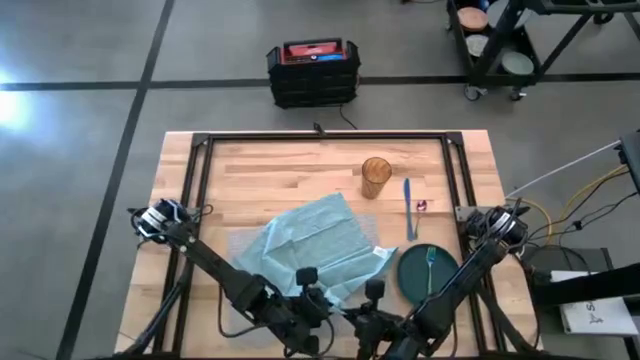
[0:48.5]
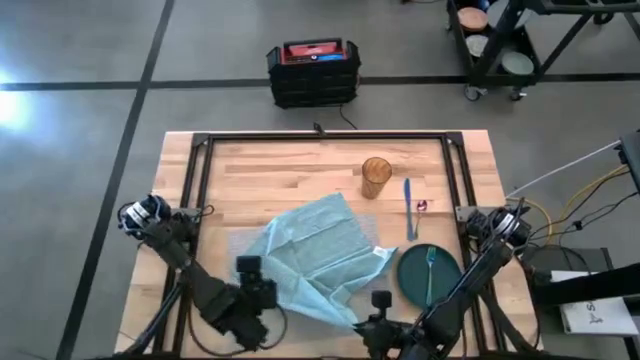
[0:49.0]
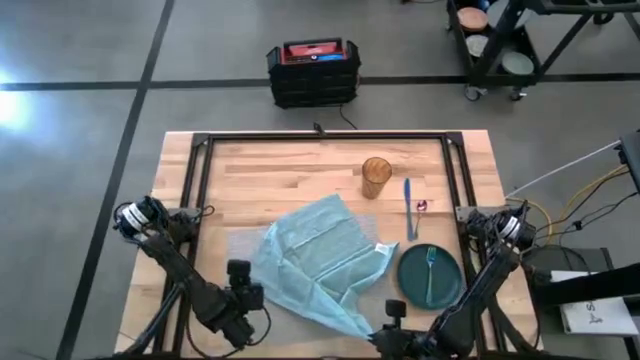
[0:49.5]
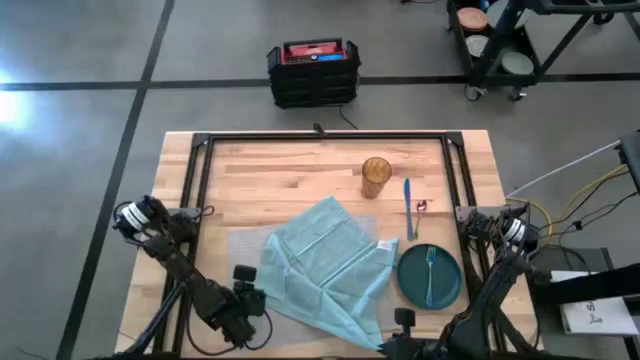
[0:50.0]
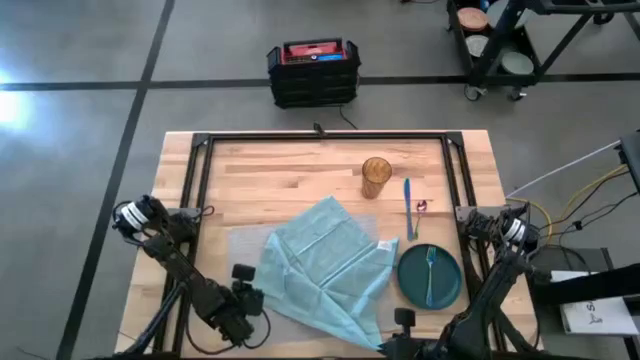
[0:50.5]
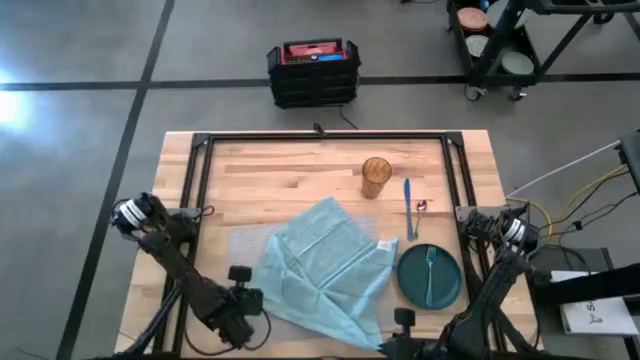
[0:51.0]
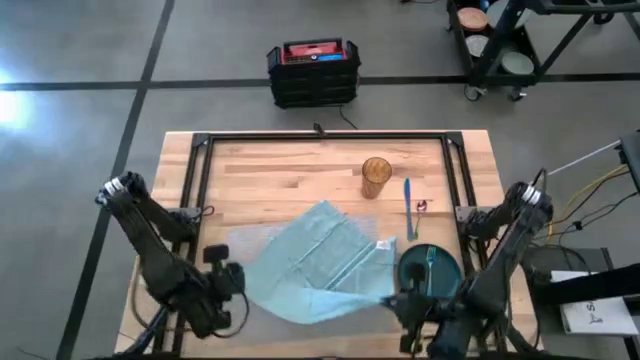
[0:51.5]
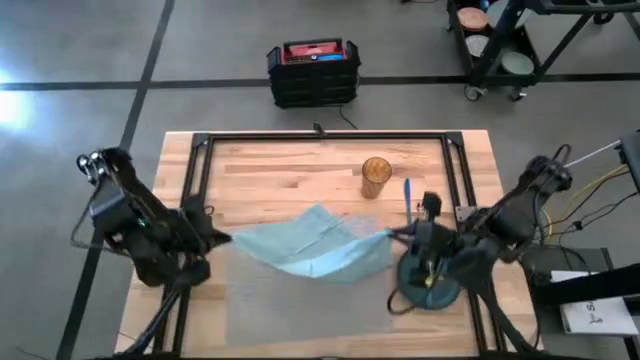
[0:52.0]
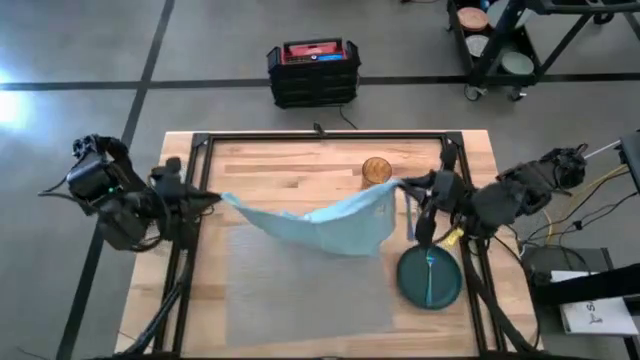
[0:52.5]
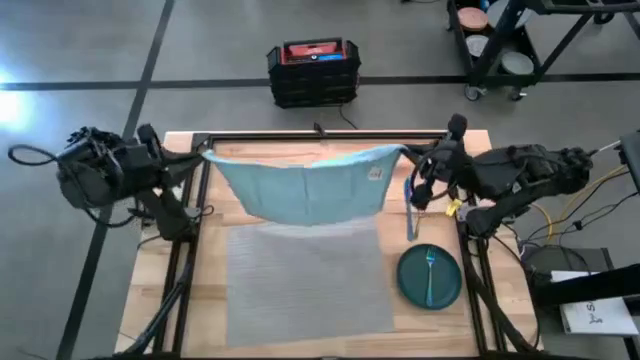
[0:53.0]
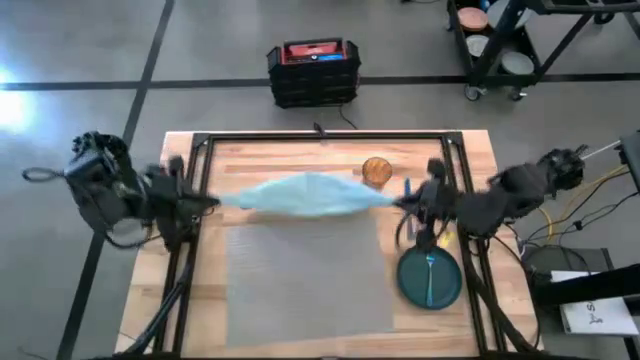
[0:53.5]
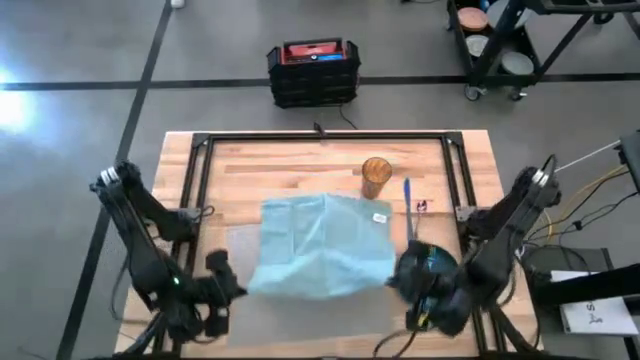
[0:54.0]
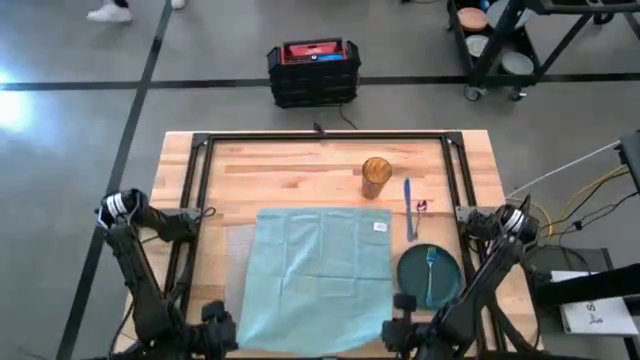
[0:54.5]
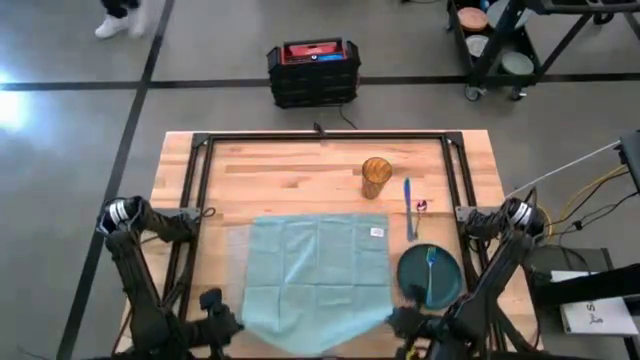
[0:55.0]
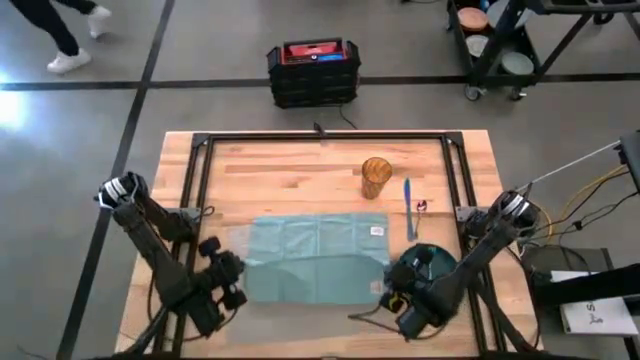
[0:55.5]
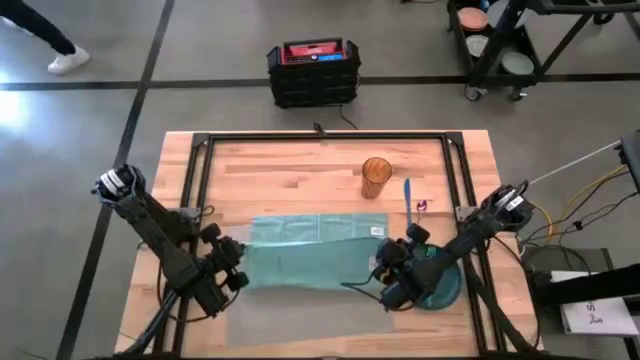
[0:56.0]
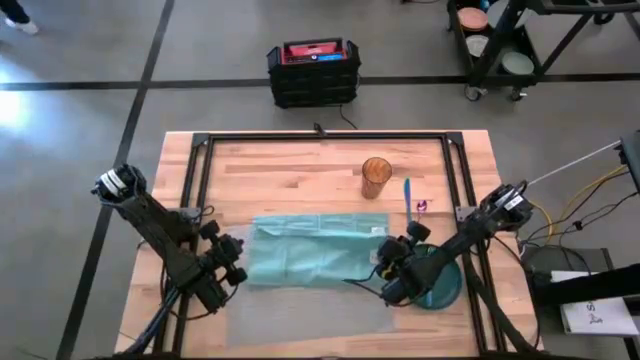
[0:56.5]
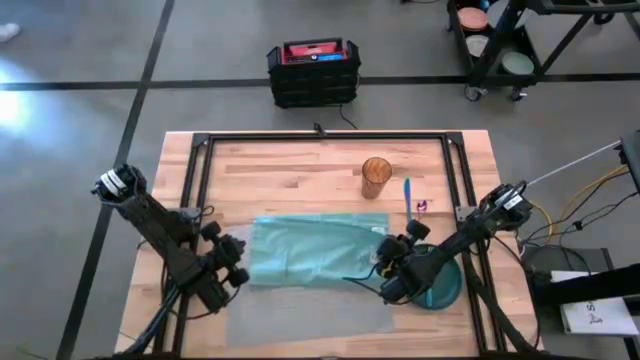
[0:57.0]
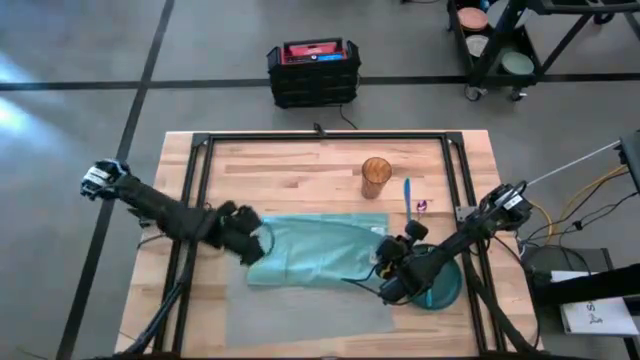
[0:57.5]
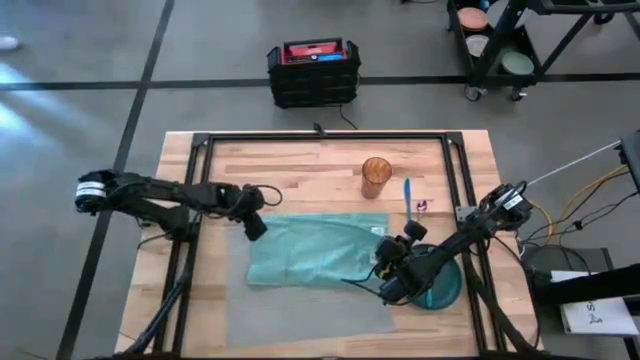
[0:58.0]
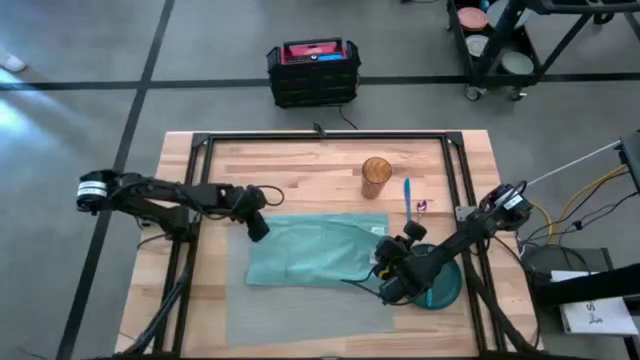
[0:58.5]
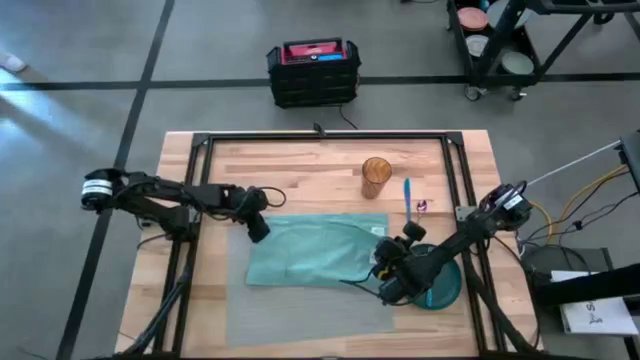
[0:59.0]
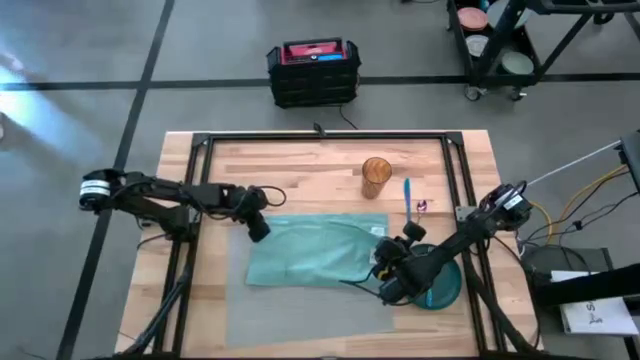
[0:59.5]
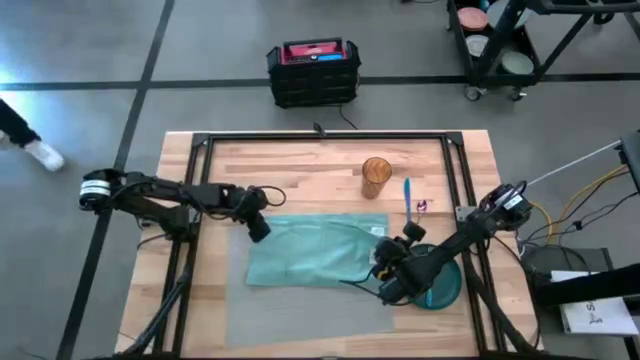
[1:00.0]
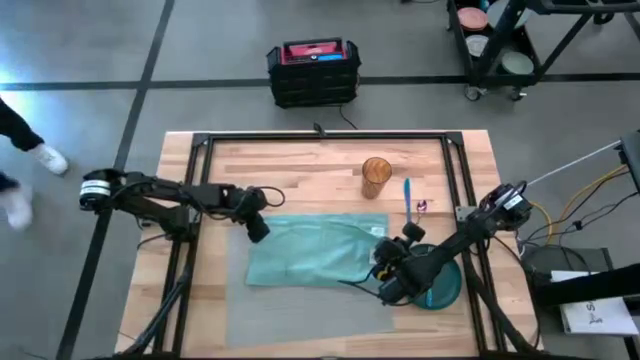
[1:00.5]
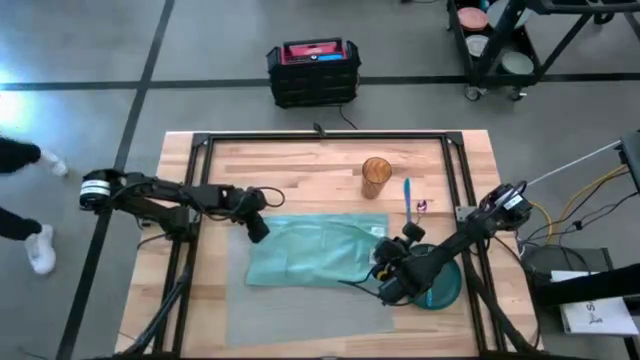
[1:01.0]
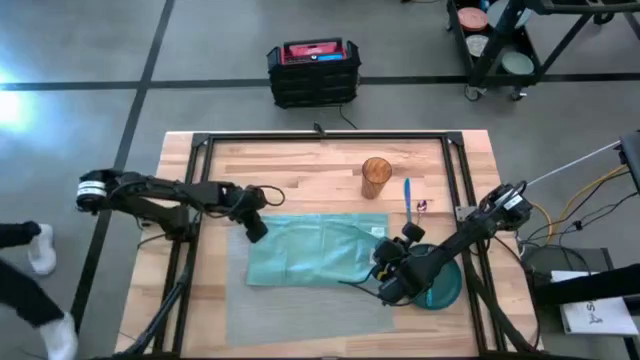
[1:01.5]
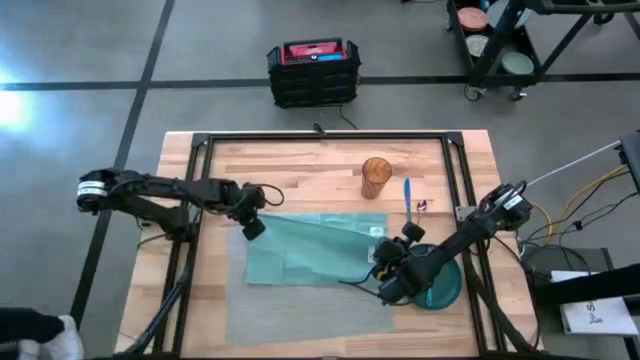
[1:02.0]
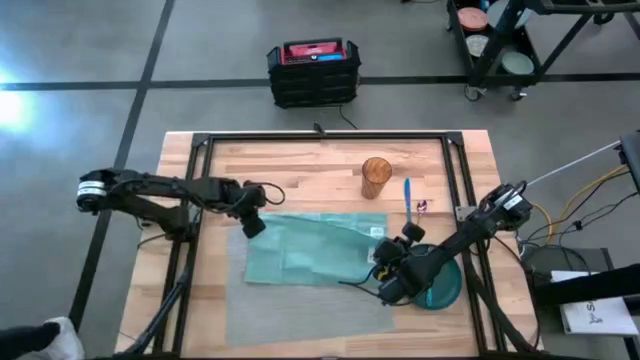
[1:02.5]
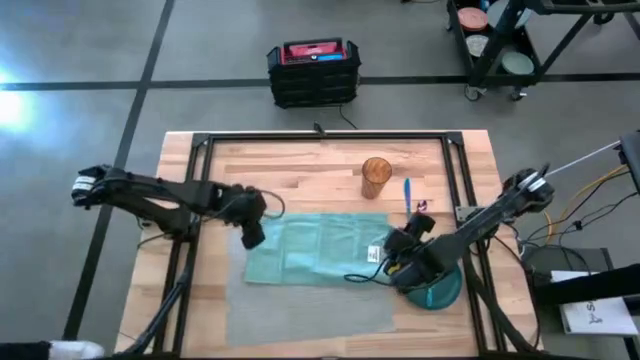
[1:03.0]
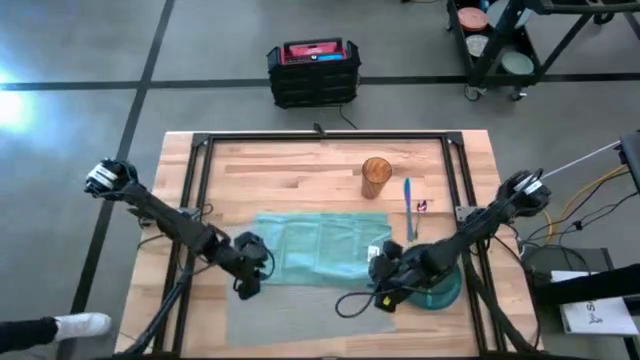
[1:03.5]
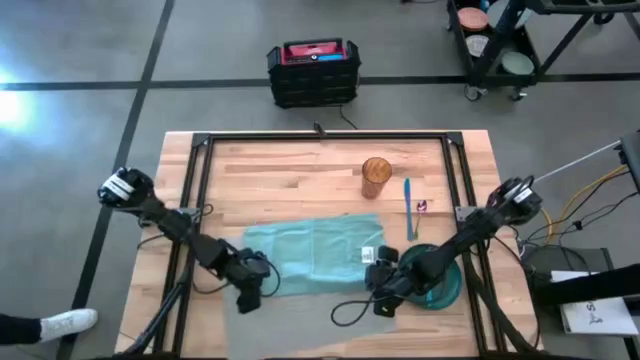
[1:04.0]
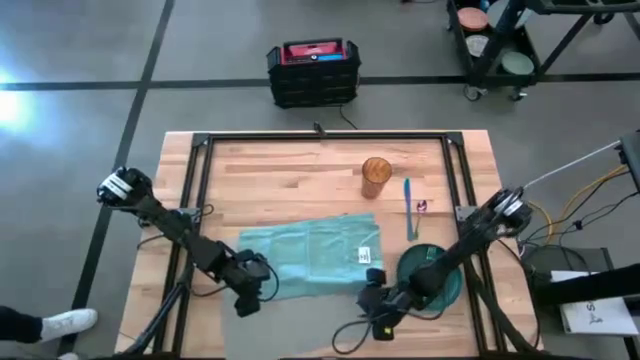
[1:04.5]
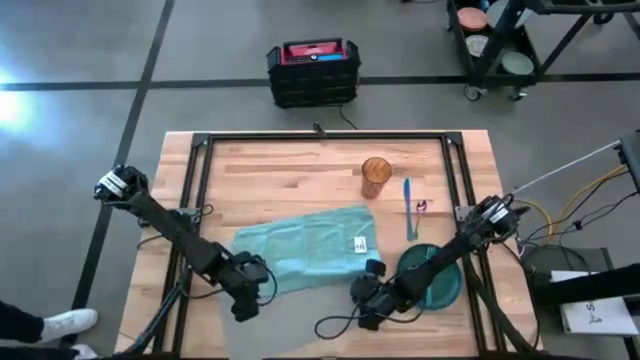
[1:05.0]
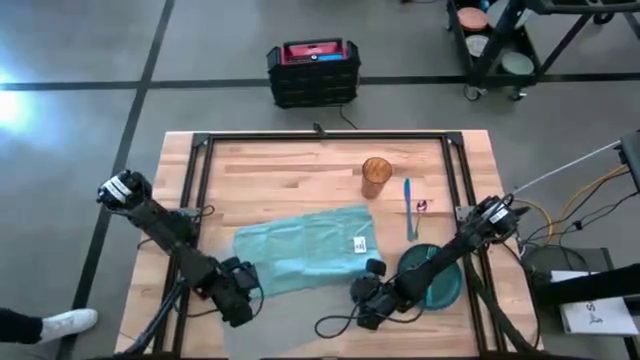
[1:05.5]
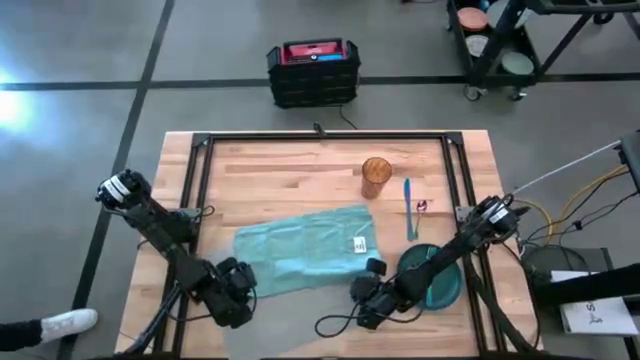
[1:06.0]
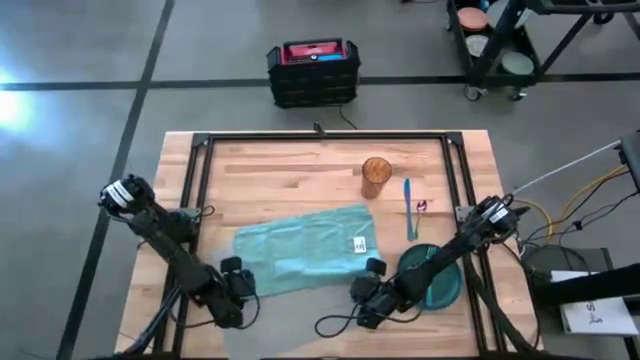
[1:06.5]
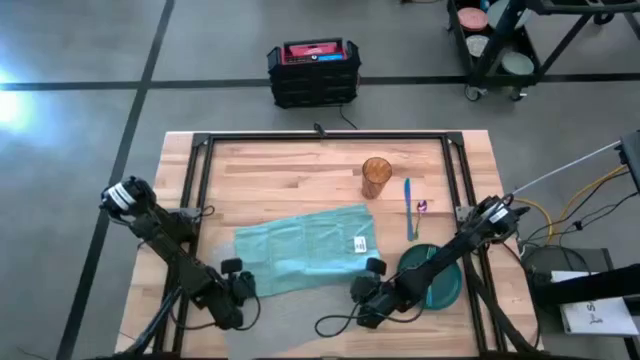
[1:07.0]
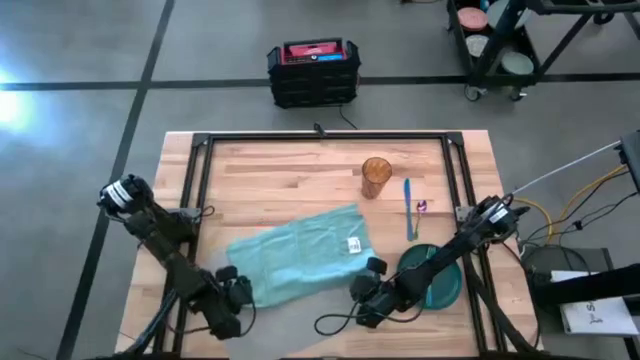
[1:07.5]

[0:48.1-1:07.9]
Task: Set table place
Fold the blue table napkin

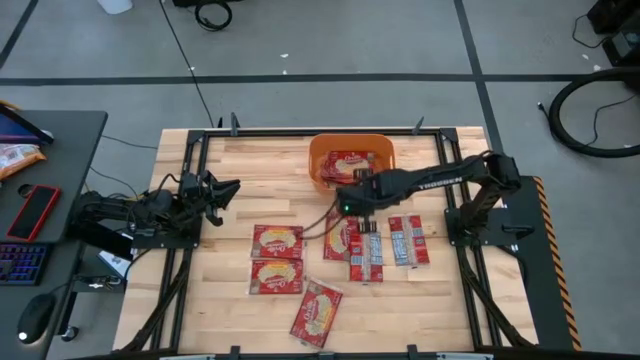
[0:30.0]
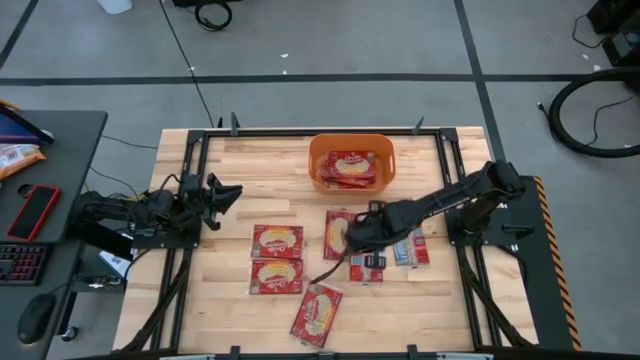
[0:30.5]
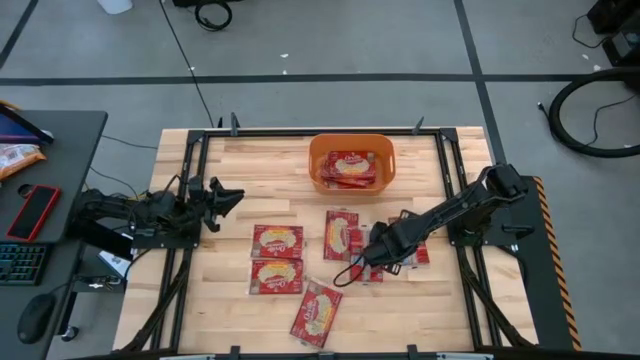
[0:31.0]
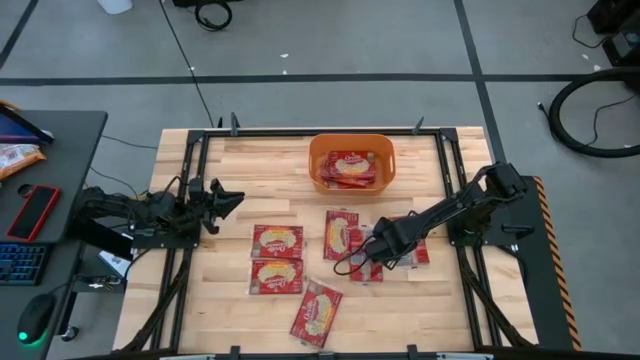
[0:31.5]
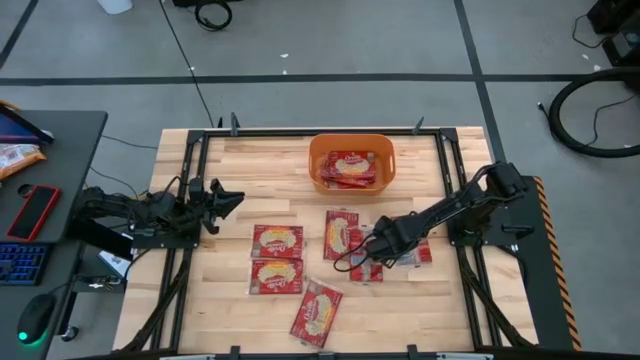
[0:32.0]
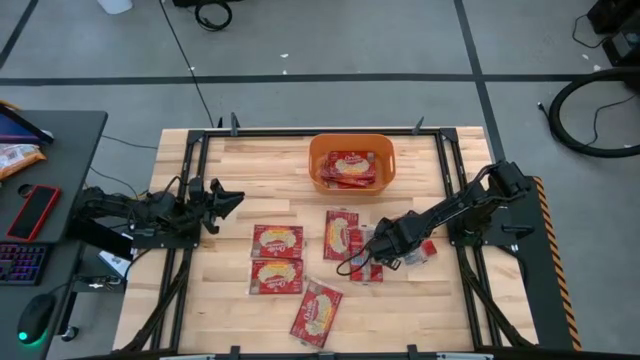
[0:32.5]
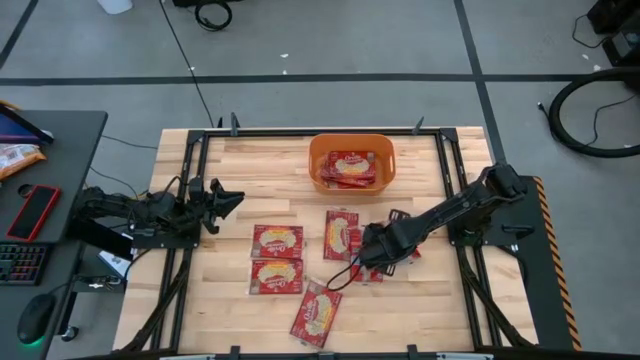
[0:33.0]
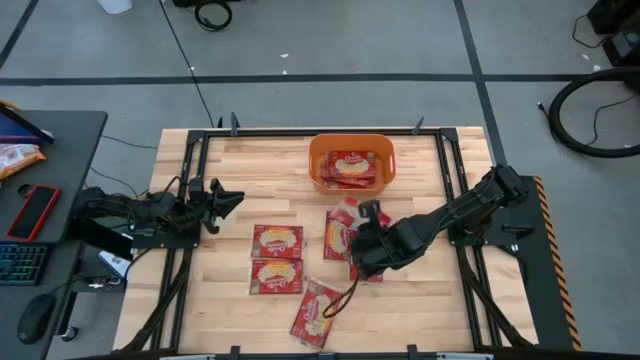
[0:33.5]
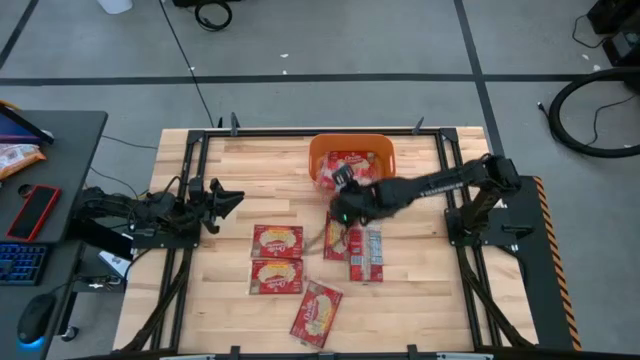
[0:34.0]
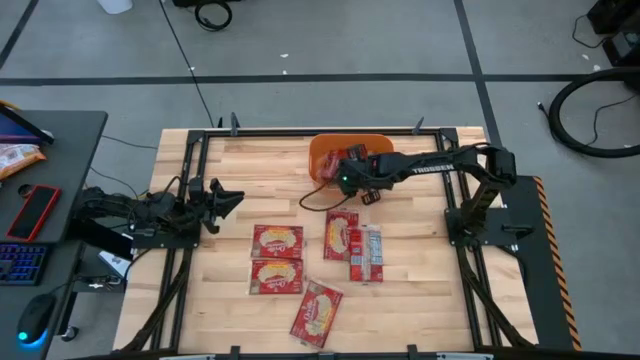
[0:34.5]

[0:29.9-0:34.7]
Task: Sort popcorn bags into baskets
Stack the popcorn bag on top of the other popcorn bag into the orange container
